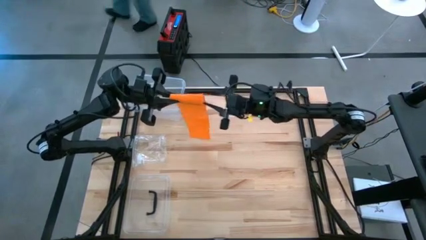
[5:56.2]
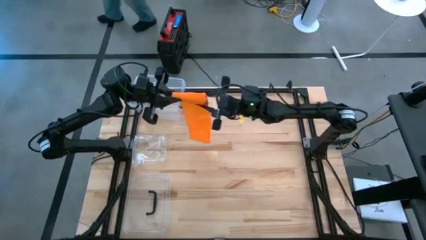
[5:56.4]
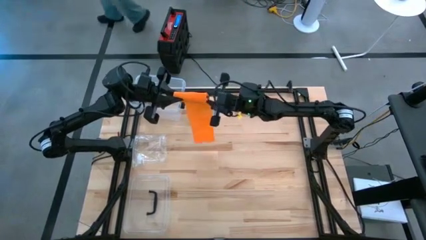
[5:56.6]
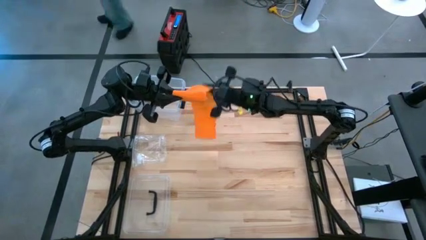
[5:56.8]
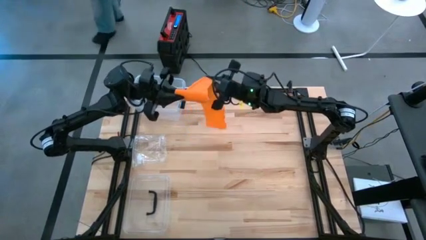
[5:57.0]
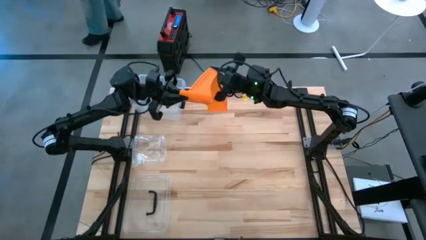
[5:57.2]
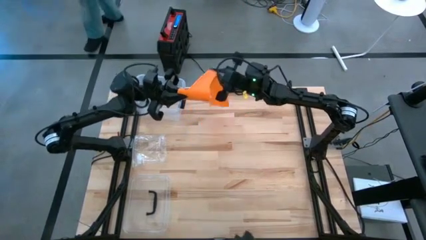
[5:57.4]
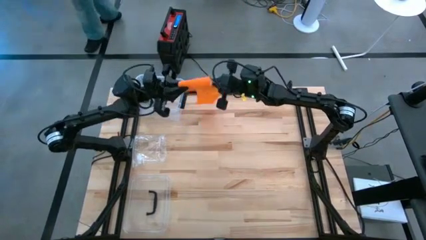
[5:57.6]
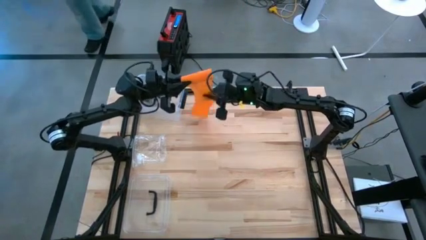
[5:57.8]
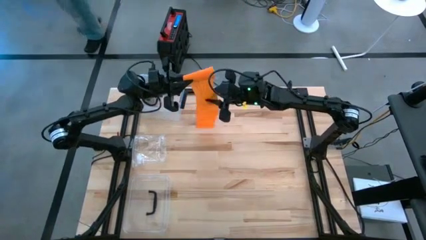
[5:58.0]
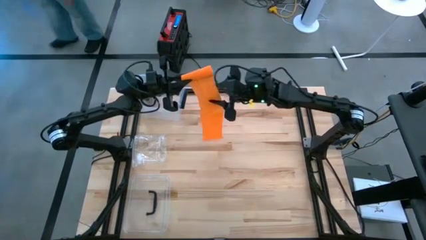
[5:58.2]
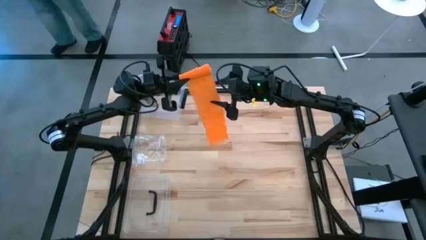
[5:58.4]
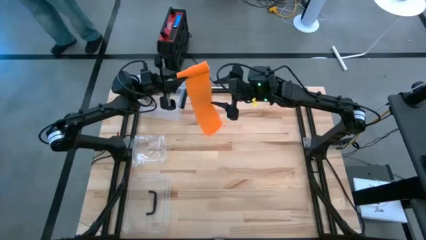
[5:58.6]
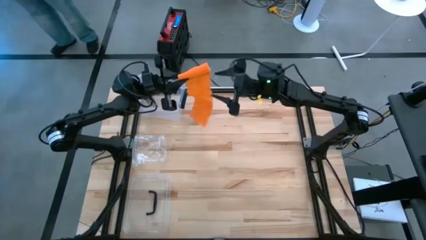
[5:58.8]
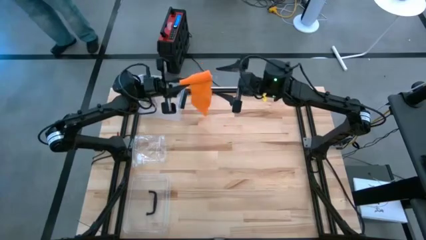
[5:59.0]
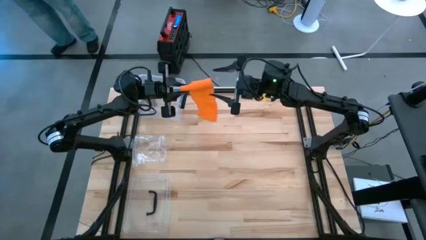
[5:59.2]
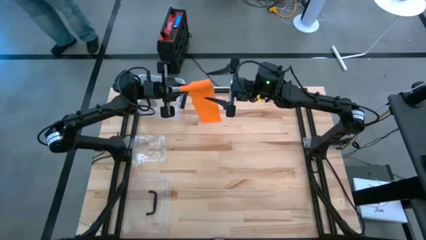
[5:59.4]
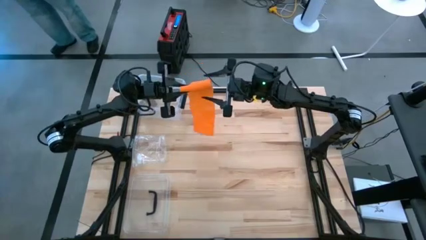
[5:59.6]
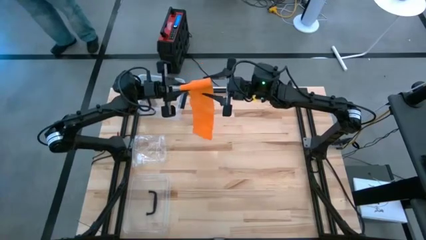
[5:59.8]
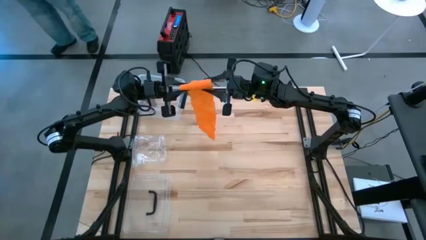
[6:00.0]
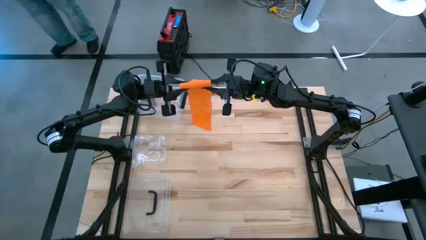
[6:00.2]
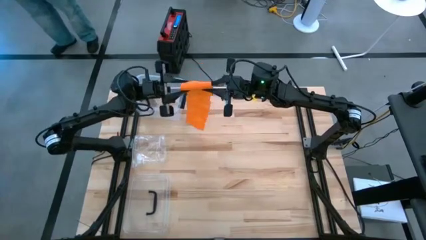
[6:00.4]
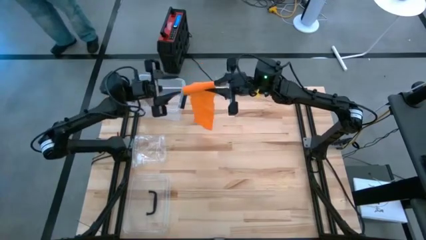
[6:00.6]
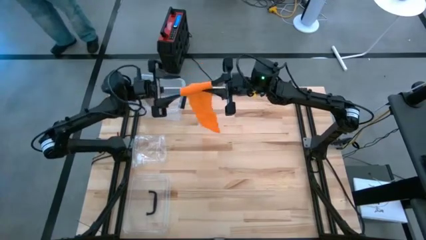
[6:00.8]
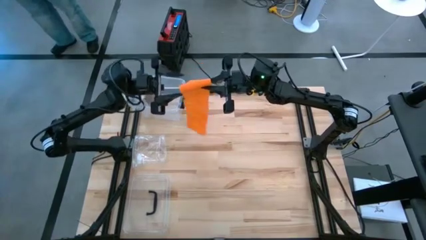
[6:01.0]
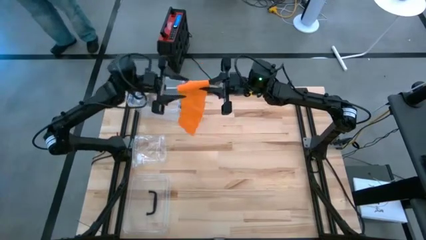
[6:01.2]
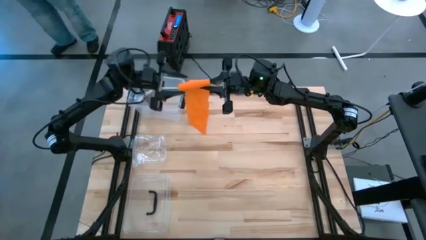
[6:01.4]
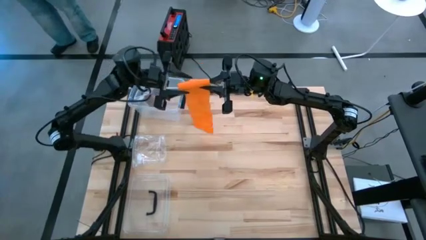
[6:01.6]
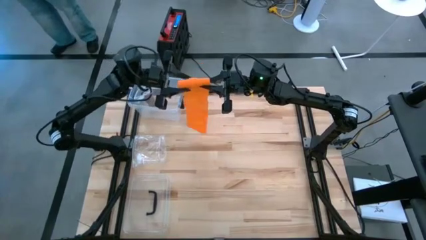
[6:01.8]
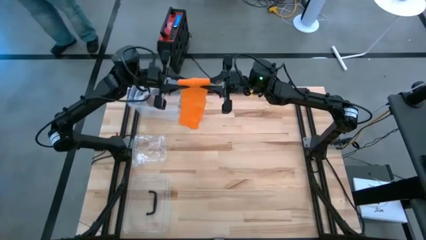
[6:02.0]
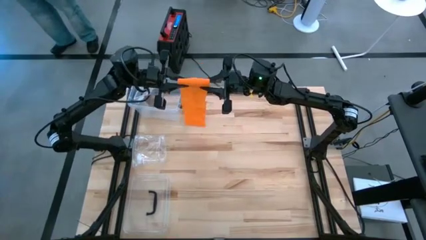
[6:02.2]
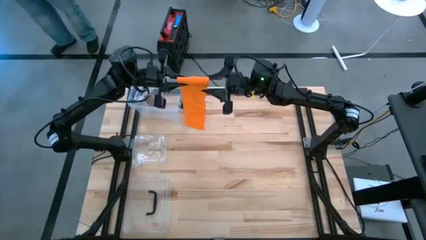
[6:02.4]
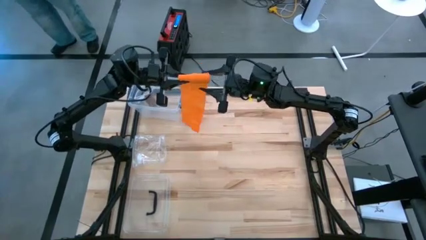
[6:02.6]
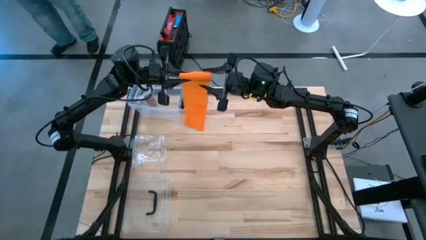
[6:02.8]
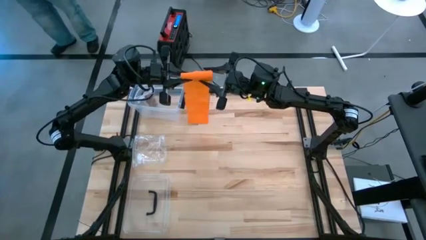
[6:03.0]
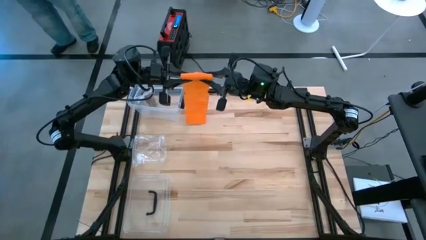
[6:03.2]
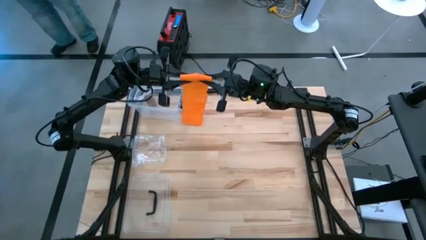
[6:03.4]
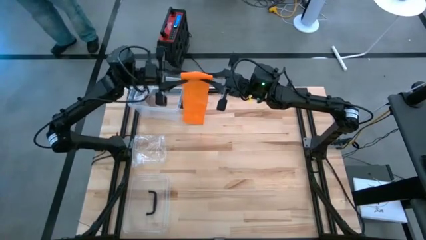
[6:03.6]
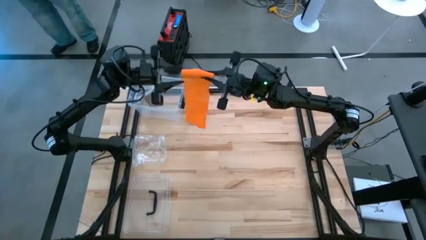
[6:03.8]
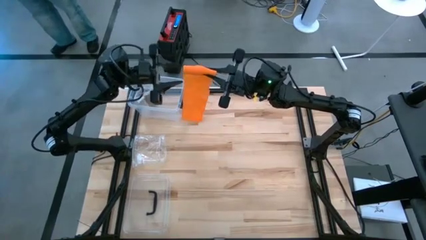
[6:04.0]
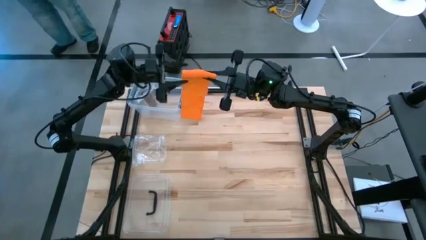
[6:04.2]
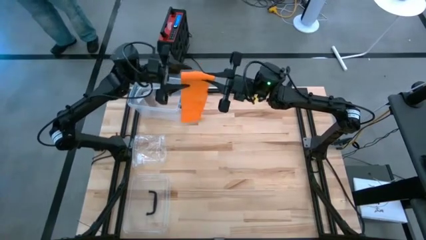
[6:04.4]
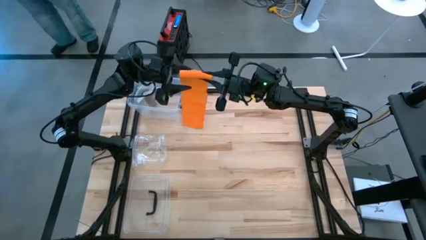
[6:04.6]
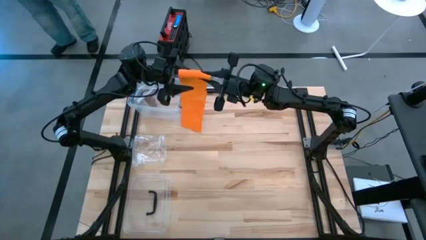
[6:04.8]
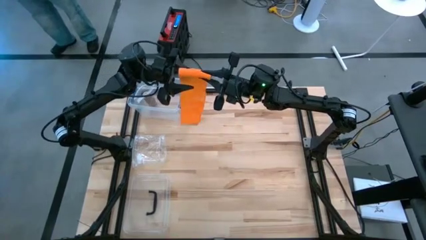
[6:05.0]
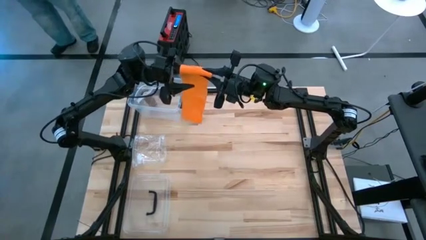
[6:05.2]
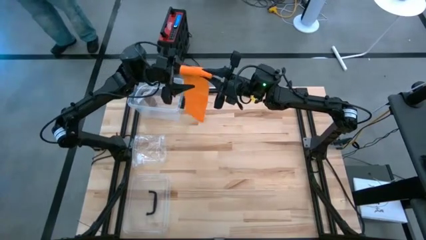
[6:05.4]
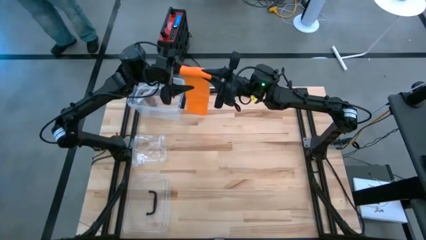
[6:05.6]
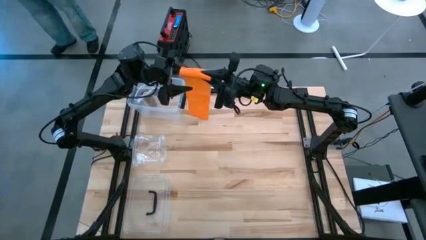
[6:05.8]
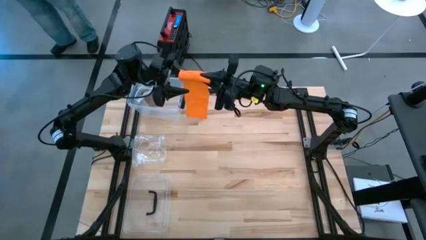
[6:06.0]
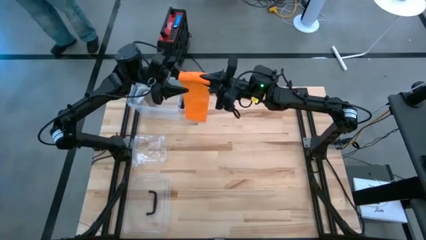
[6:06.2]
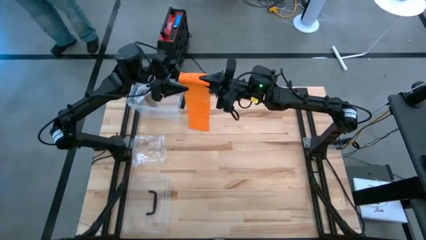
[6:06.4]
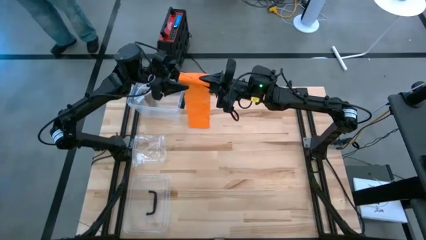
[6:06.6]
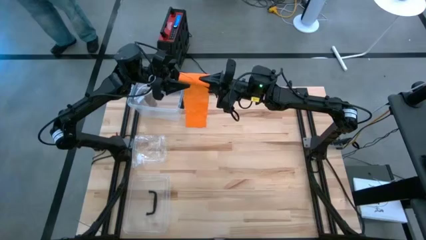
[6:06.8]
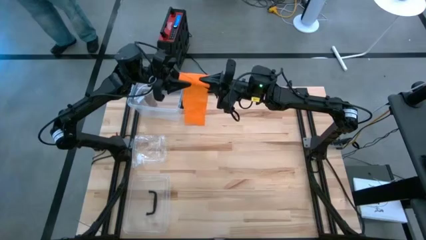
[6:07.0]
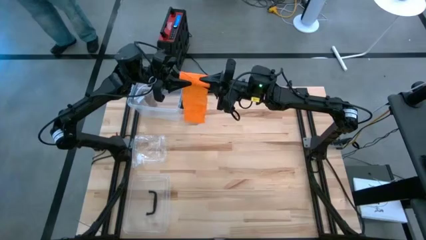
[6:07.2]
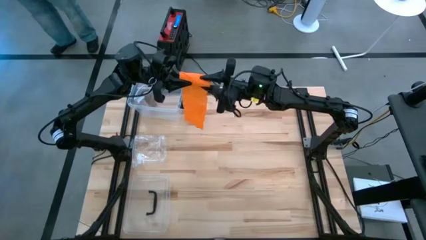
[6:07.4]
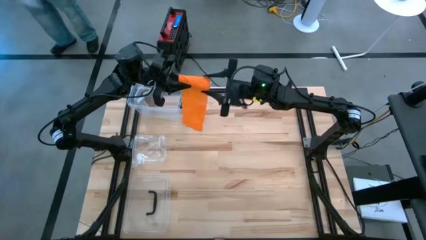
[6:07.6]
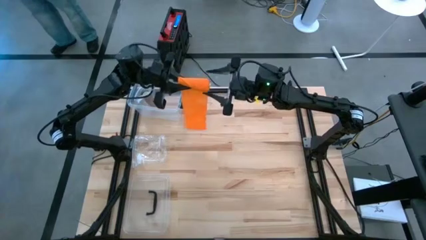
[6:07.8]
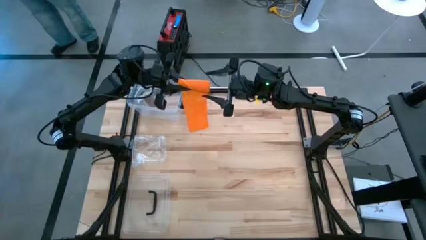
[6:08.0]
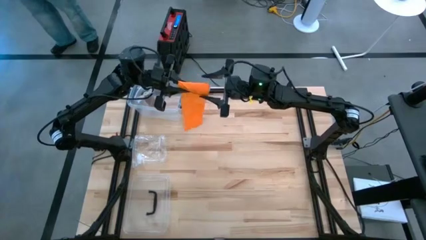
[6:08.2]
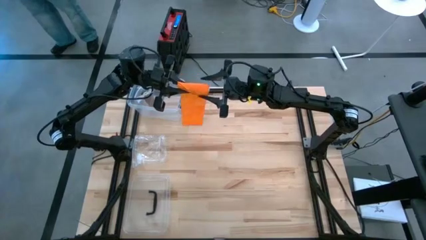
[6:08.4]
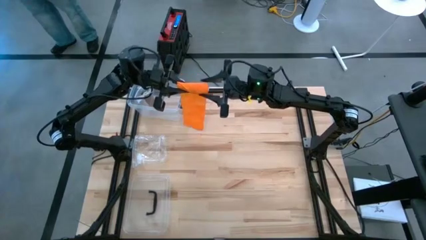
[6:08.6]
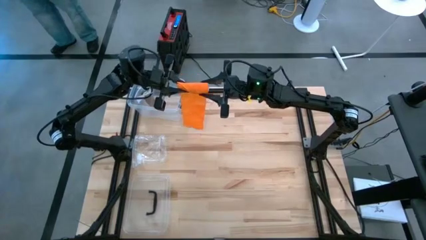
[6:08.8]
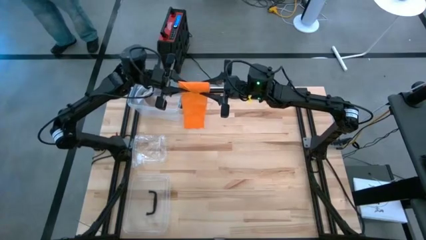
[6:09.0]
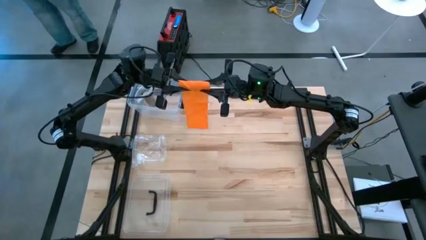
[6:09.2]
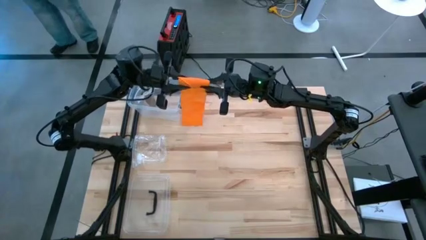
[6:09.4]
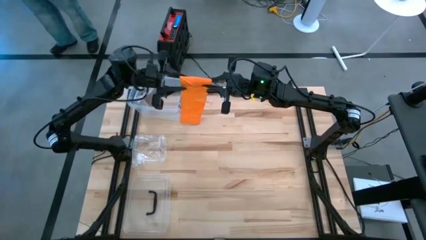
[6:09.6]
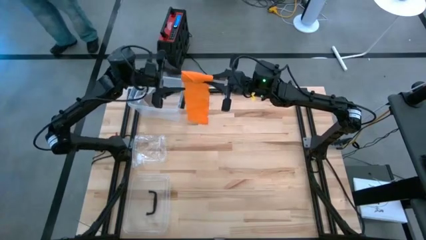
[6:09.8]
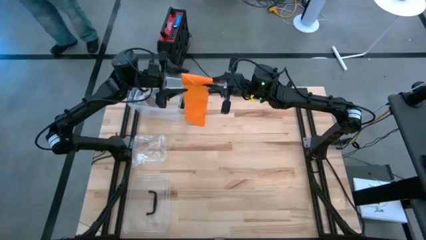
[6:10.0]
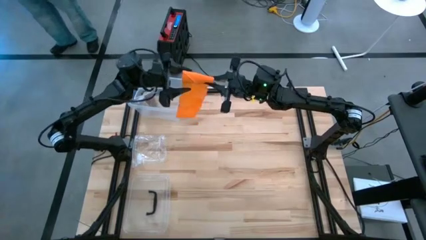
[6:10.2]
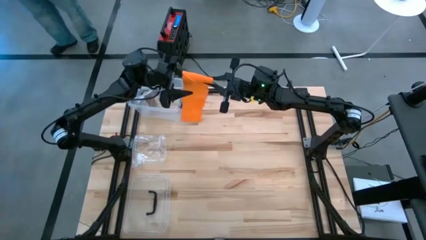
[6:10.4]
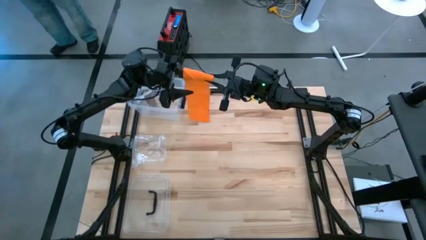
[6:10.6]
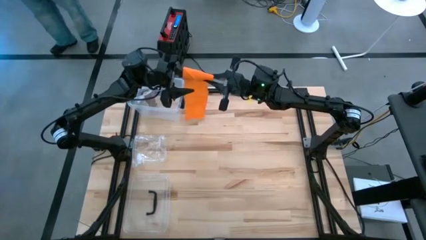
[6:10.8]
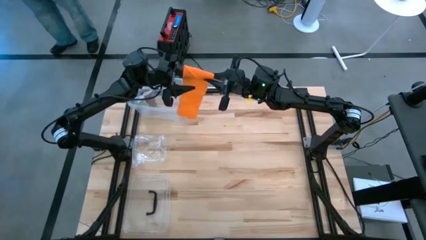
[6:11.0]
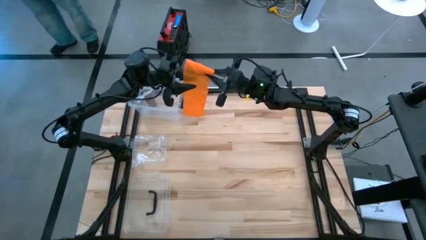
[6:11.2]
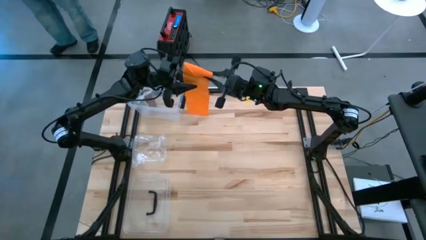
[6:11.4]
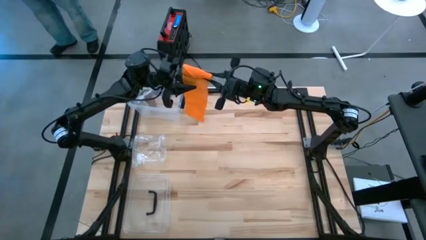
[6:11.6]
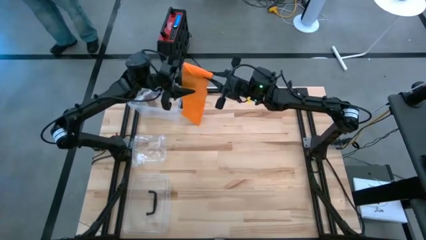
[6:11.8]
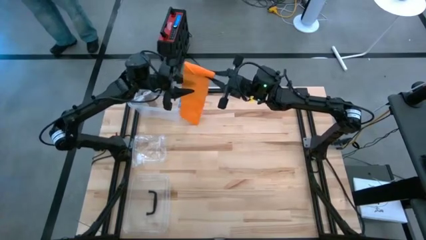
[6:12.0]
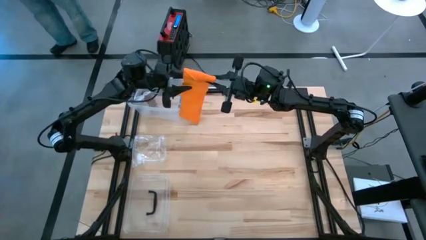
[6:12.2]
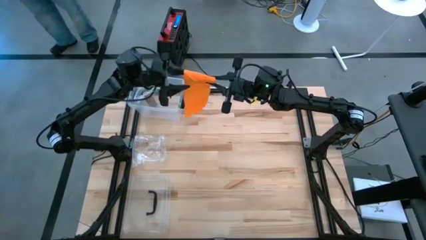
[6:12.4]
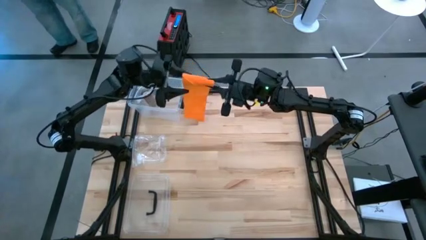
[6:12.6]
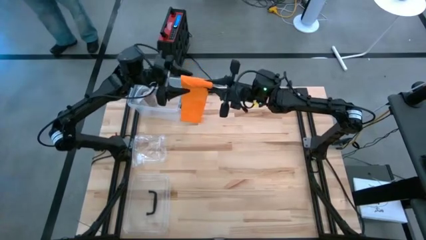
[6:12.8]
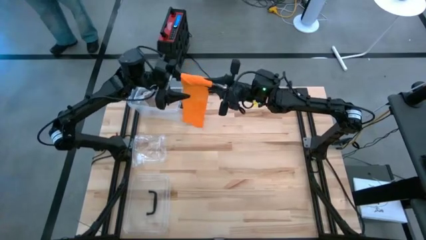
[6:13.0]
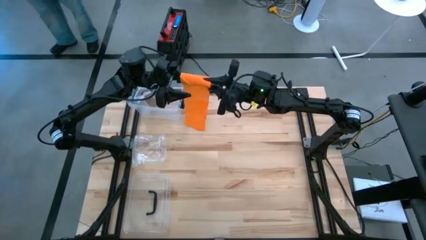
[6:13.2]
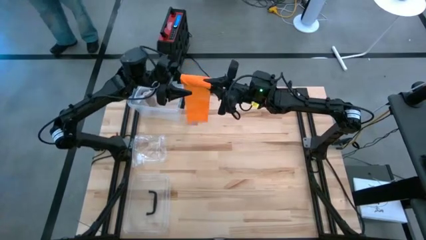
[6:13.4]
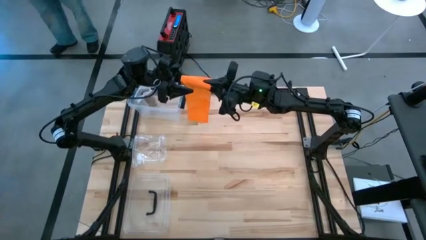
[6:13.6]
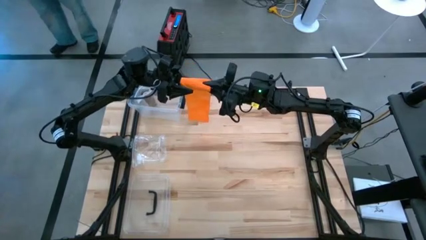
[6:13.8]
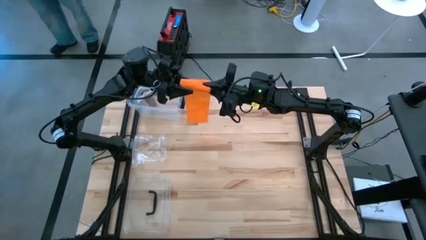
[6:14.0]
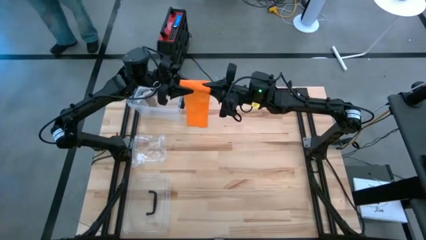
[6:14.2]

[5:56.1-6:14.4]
Task: Roll bandage
Roll the orange bandage
